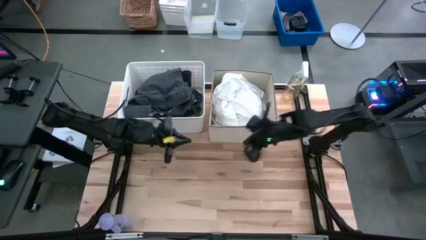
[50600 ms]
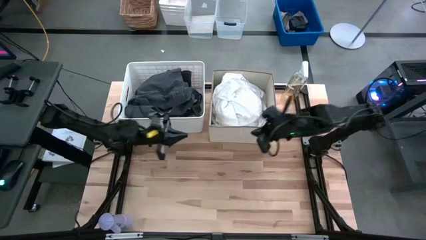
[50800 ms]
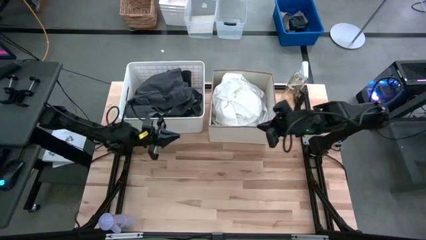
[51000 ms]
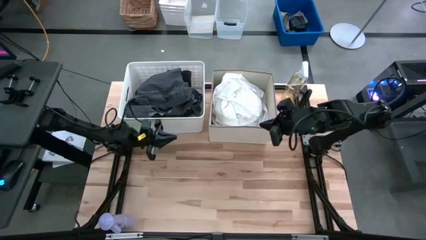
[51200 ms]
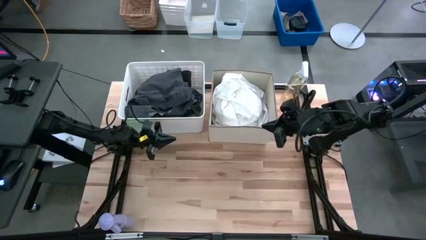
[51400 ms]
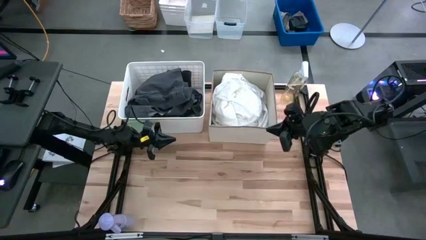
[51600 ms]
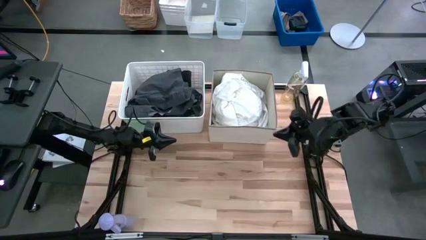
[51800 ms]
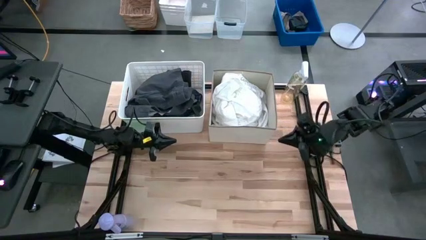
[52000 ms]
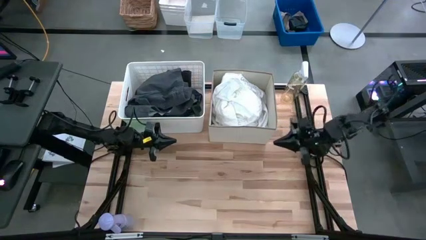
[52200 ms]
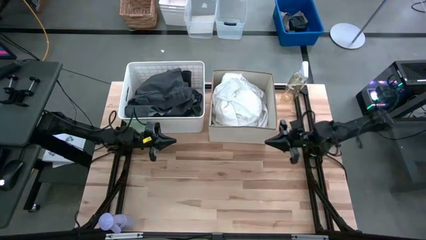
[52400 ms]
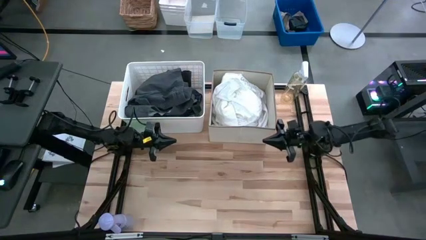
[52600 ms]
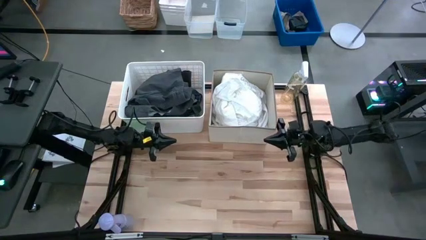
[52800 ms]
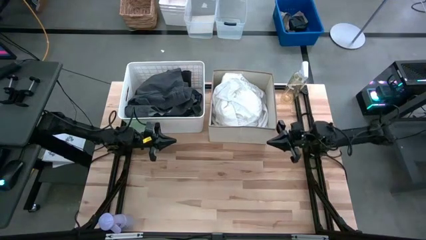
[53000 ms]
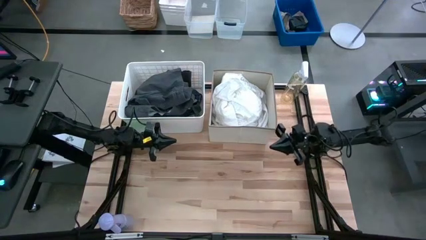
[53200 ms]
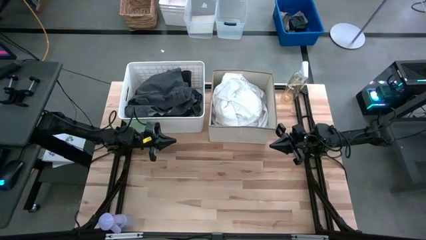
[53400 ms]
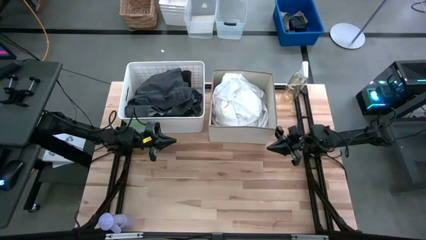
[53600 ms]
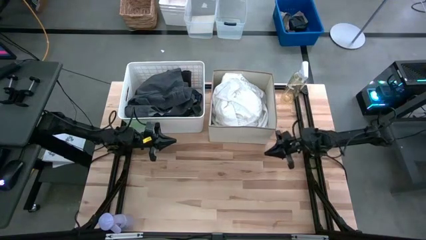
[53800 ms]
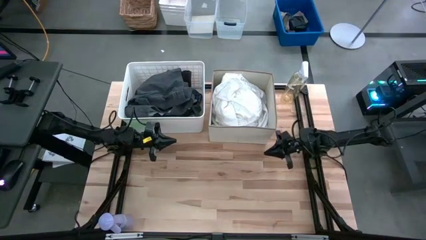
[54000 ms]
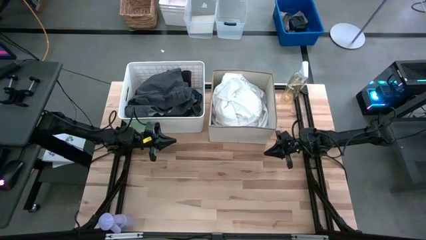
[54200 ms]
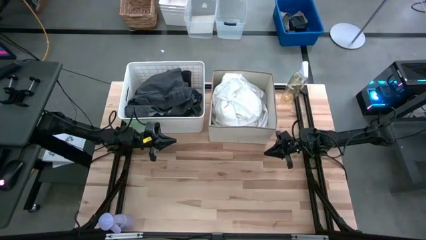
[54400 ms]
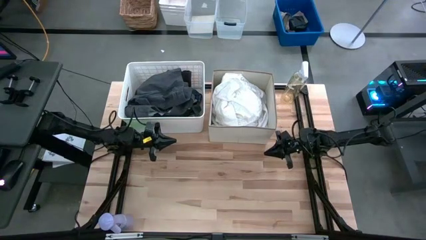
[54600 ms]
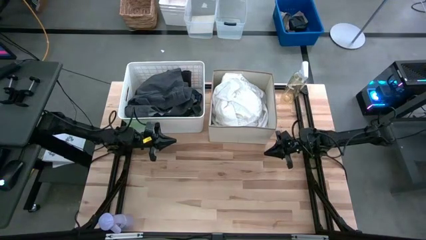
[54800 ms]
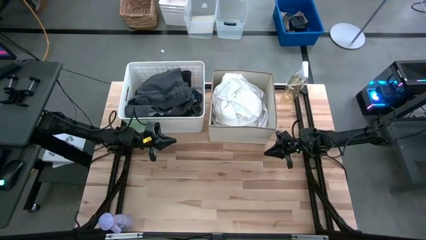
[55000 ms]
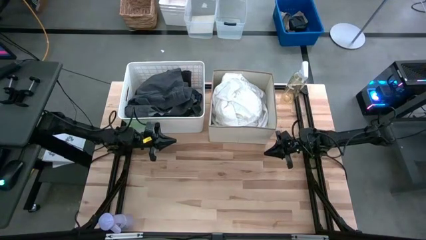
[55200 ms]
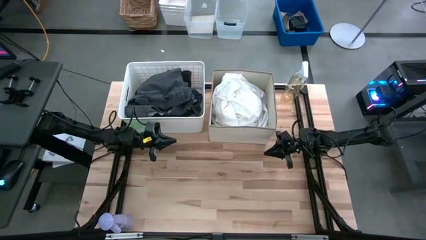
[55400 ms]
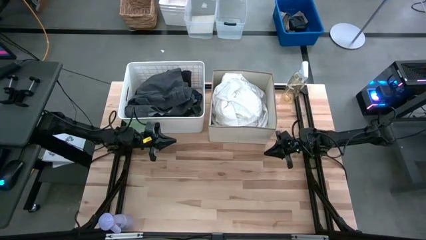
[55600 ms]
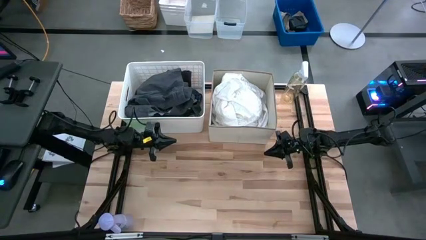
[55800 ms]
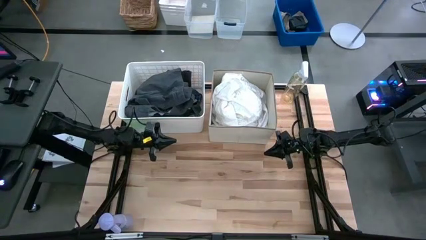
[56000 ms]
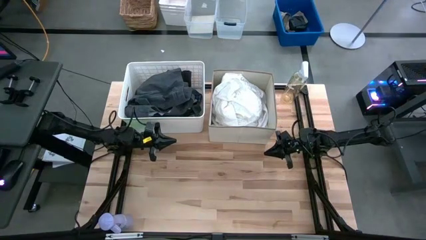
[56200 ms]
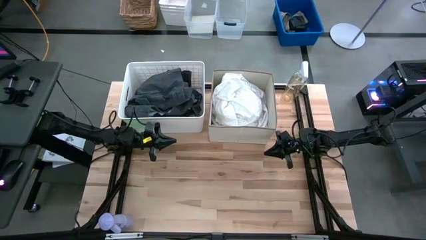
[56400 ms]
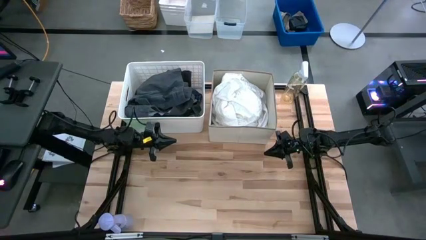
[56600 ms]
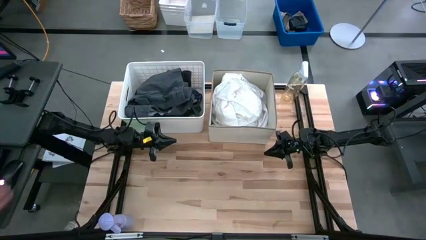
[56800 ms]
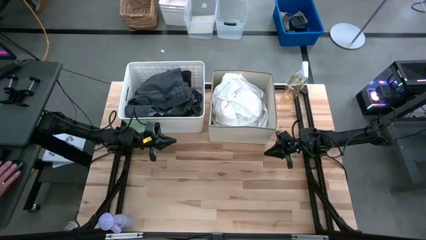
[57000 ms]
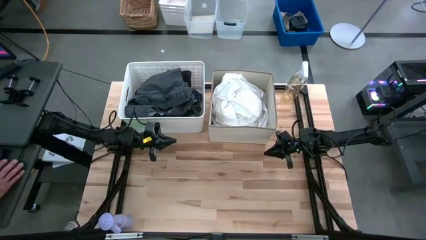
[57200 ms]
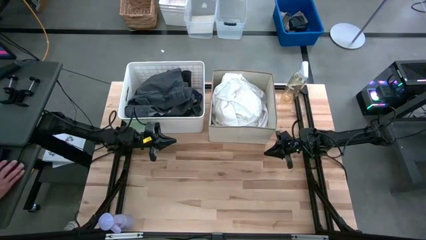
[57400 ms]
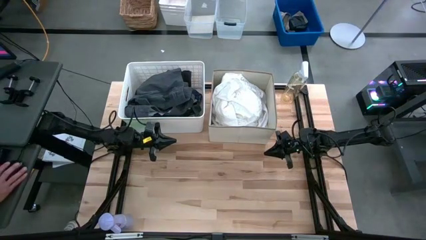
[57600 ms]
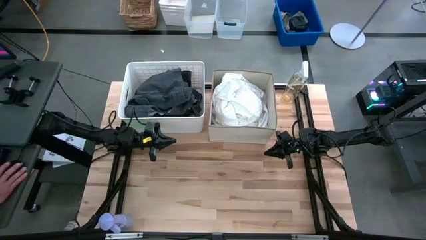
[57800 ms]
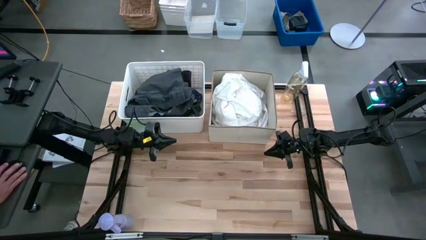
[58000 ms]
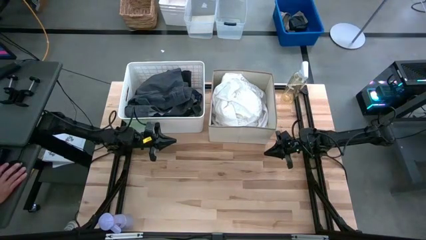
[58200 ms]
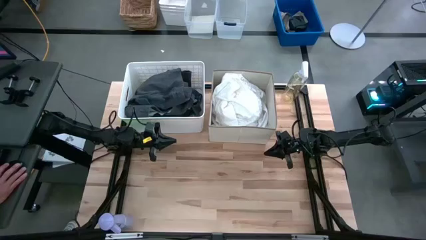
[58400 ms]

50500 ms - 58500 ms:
Task: Sort clothes
Return to Home PositIon

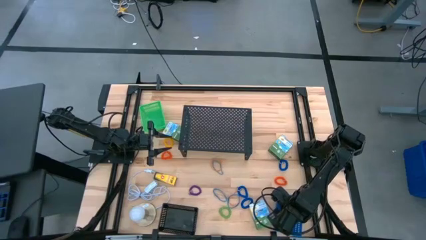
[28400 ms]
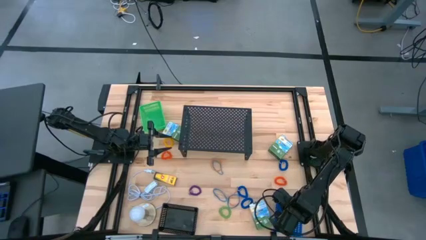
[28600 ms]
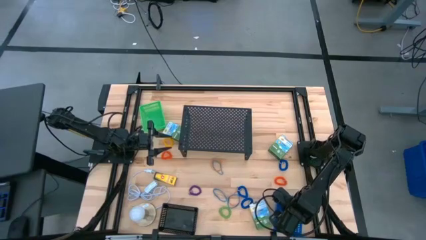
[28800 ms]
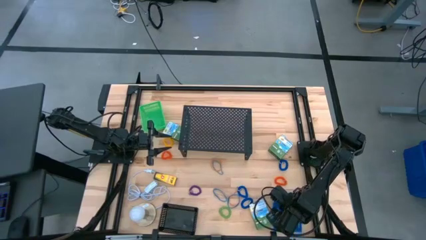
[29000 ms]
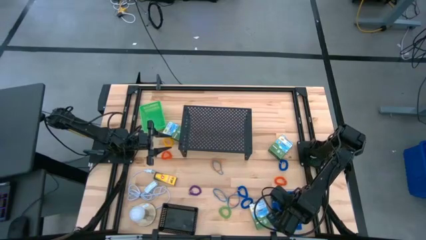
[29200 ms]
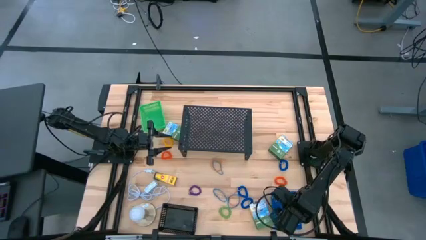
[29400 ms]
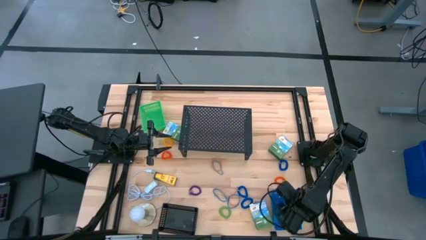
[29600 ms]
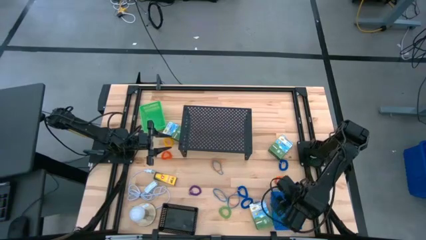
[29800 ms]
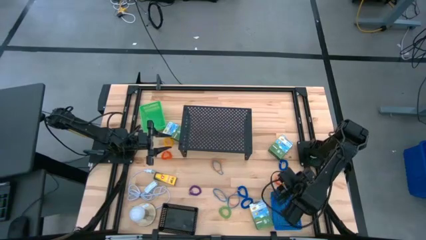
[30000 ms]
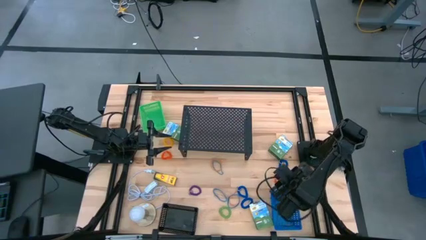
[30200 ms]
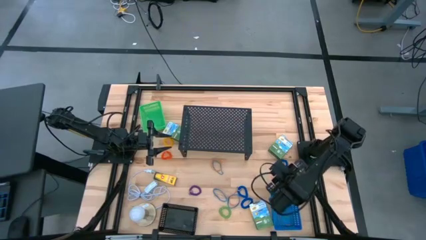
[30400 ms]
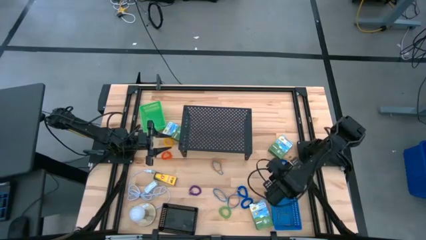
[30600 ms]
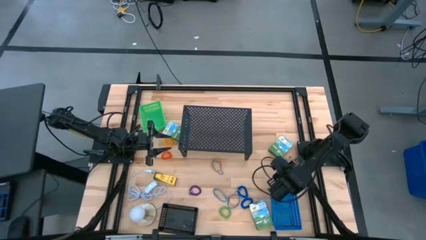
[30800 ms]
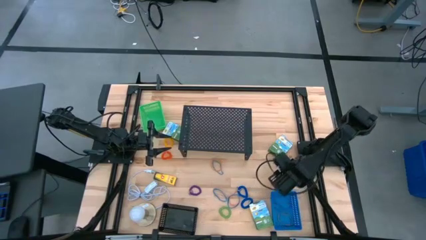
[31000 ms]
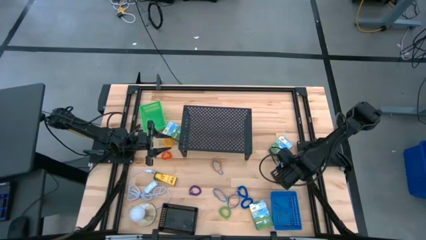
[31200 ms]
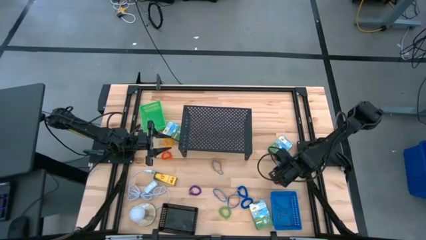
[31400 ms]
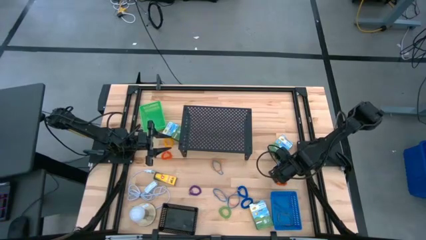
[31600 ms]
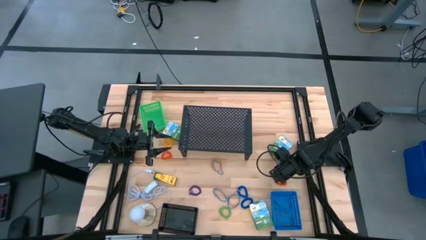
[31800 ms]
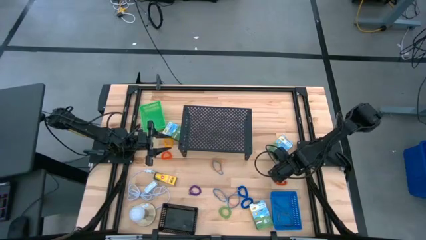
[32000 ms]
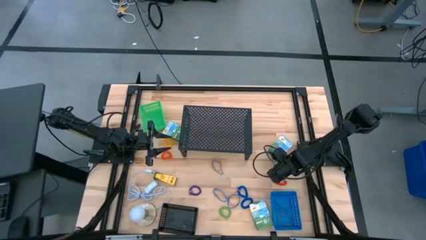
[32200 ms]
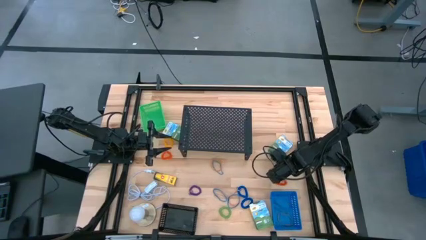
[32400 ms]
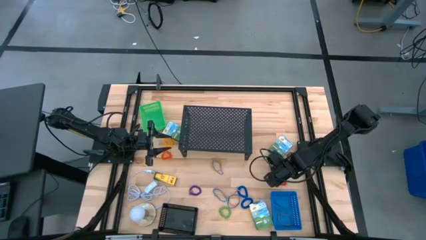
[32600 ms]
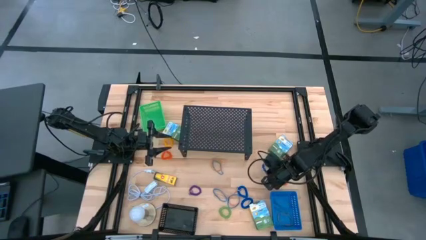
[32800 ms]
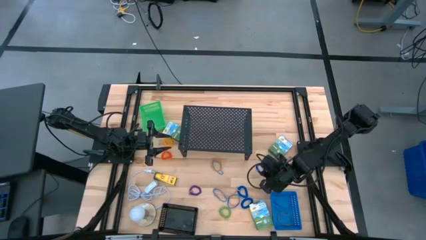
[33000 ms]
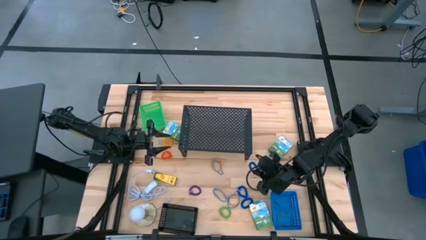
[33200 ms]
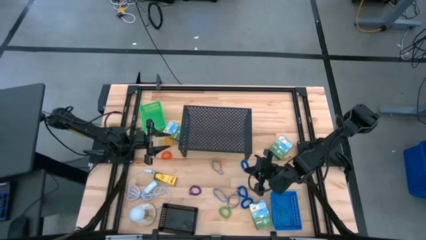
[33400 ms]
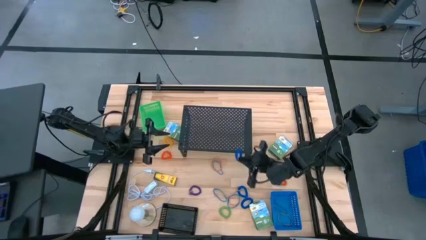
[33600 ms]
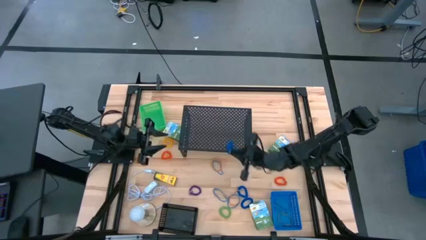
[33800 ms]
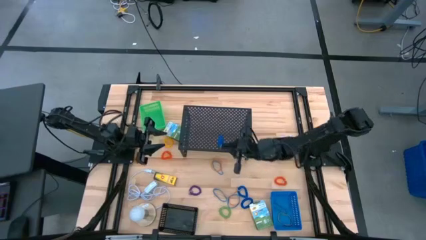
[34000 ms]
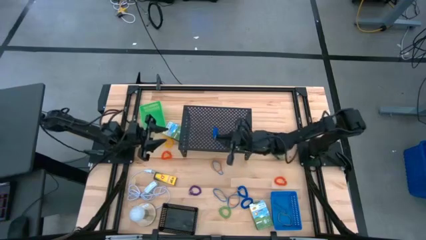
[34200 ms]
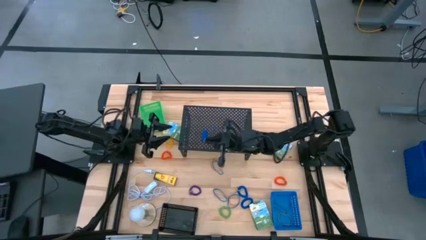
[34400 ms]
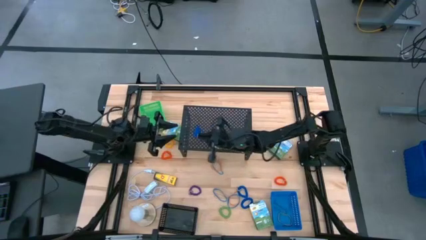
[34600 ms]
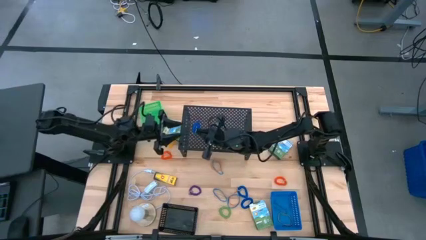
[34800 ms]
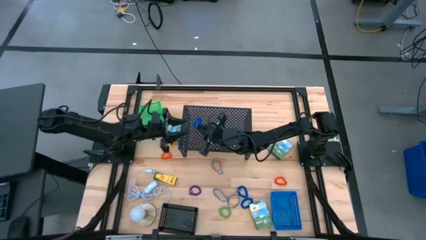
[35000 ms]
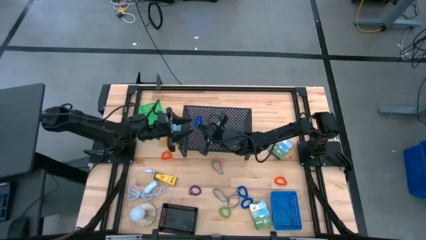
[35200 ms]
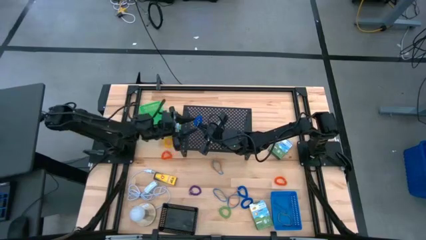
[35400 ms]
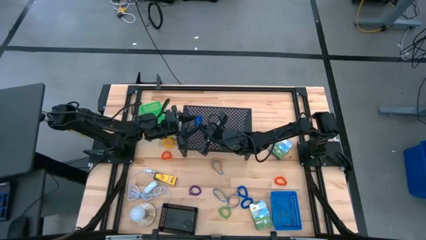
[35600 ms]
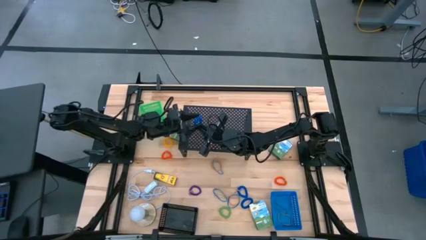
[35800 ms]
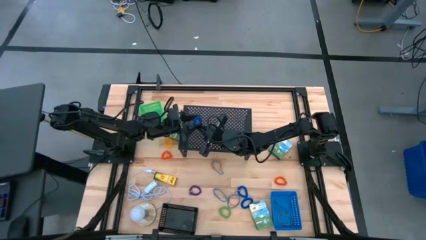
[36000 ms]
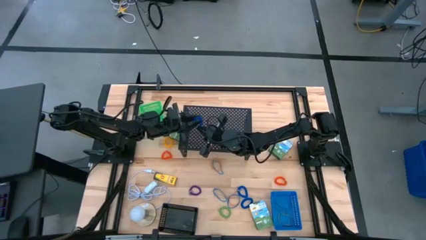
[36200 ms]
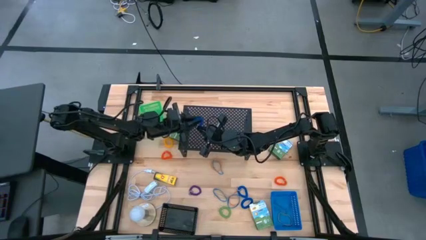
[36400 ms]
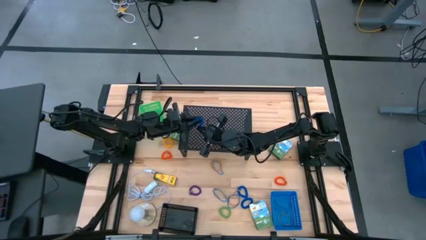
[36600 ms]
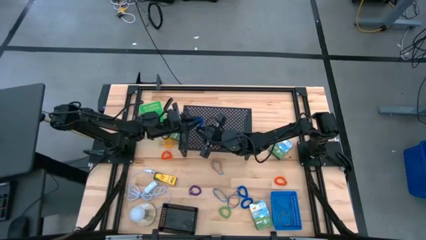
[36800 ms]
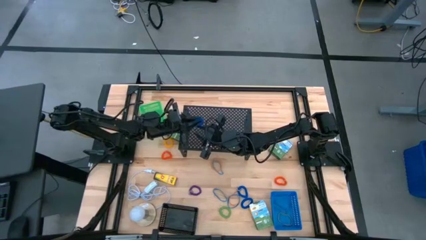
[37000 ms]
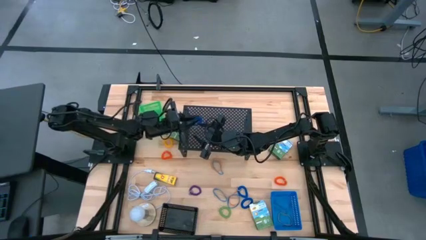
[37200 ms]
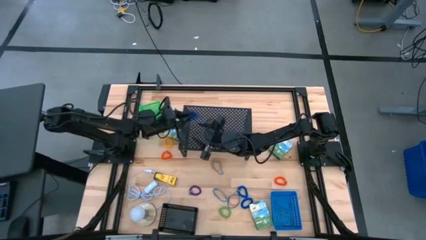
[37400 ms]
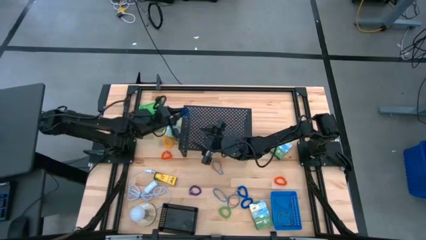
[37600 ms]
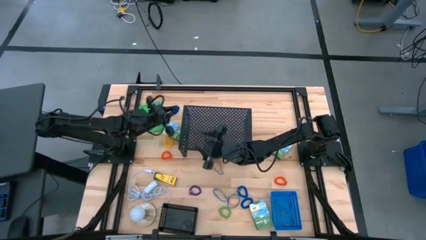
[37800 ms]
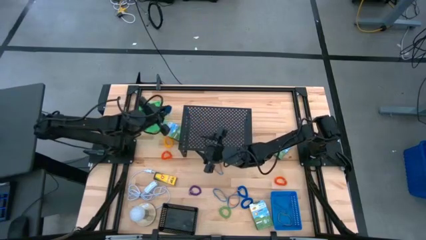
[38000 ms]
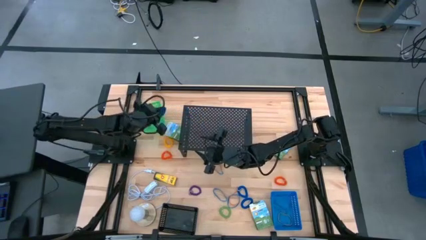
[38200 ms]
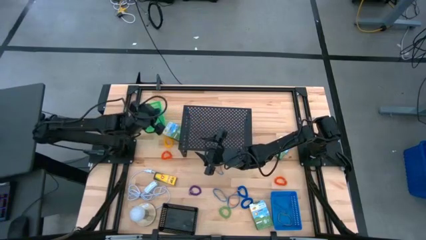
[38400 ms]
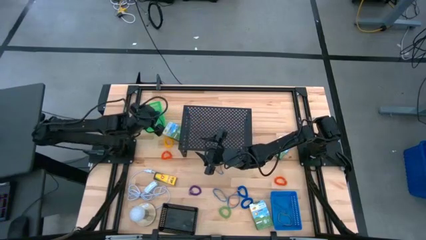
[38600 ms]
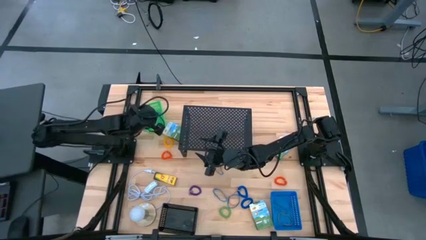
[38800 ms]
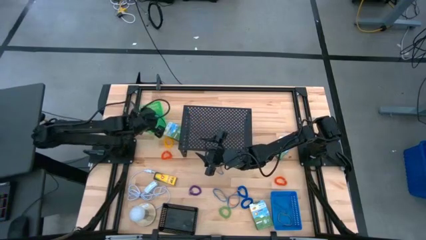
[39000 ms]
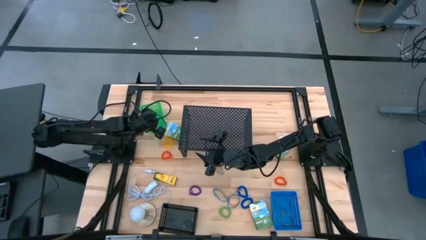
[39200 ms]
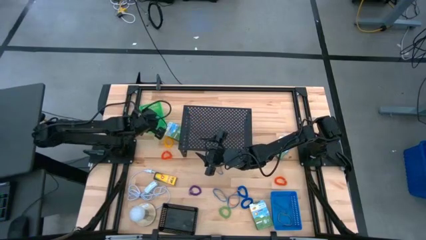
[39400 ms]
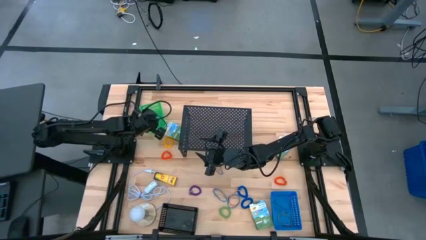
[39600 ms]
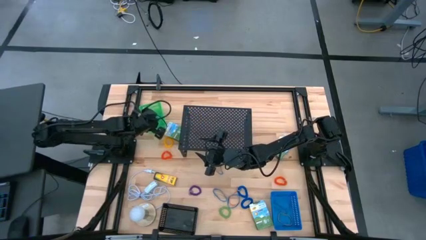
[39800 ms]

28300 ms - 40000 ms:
Task: Pick & Place Office Desk Supplies
Put the blue spring keychain into the green bin
